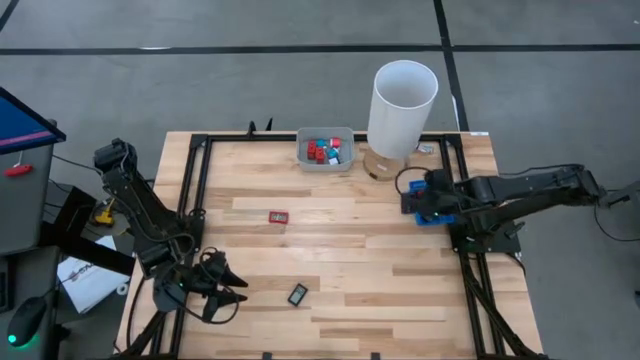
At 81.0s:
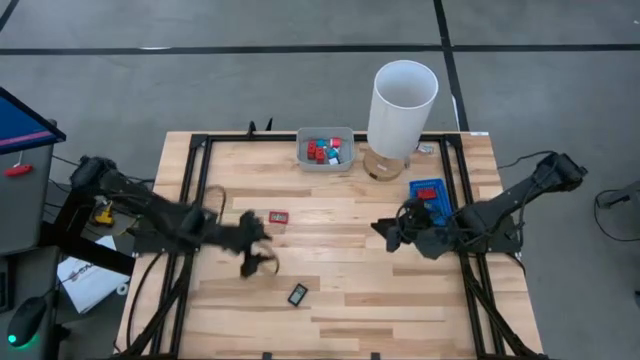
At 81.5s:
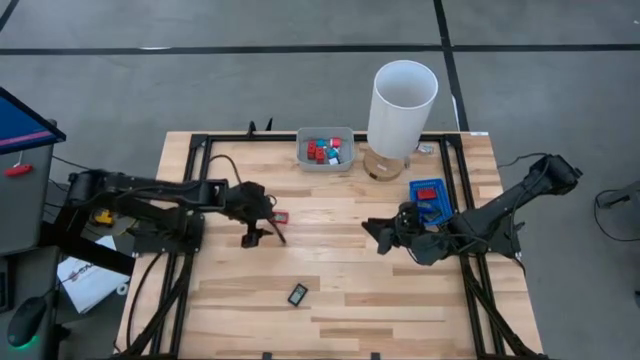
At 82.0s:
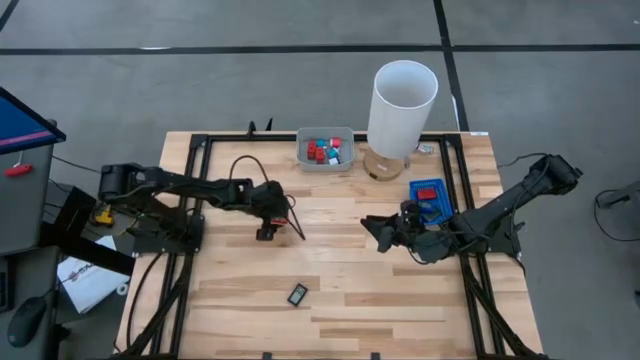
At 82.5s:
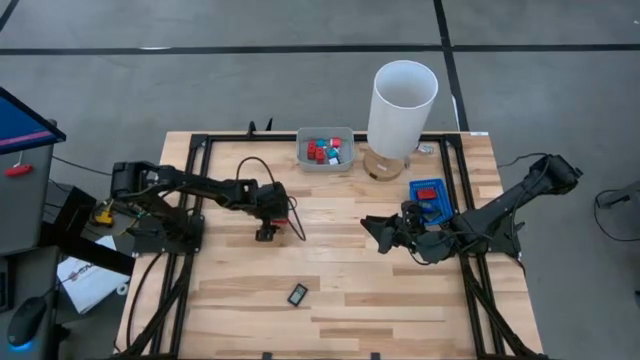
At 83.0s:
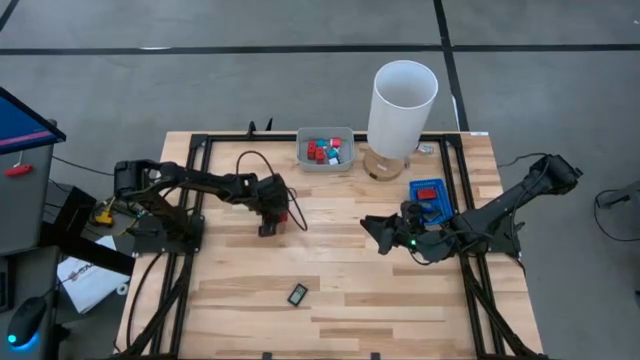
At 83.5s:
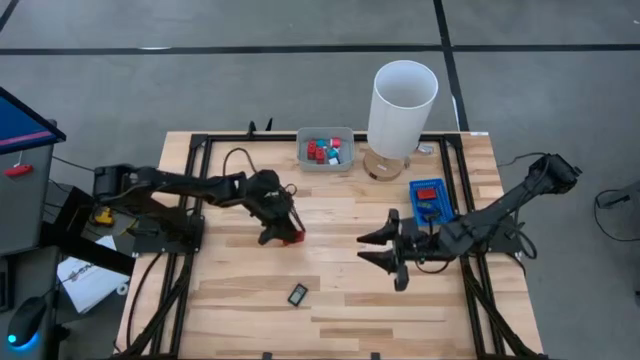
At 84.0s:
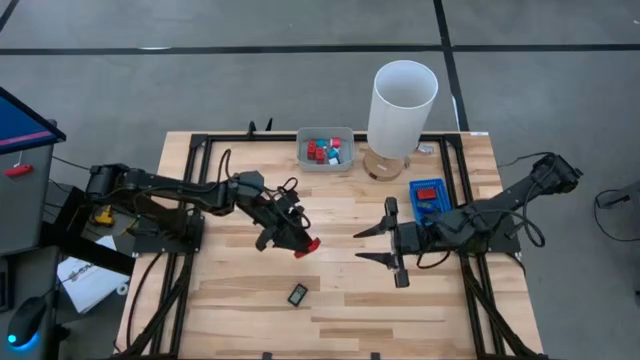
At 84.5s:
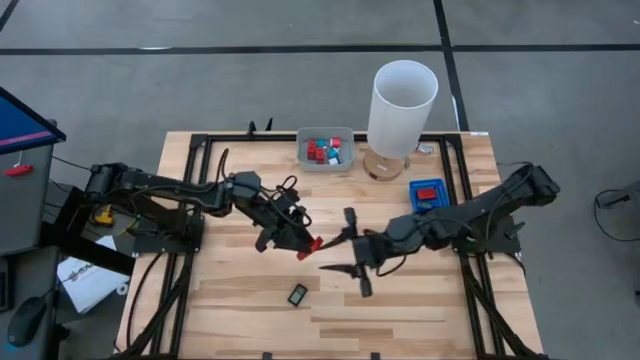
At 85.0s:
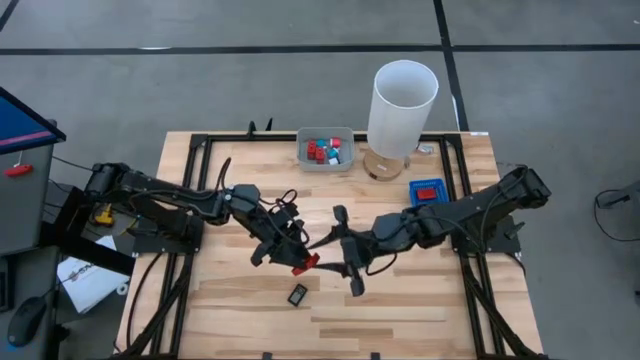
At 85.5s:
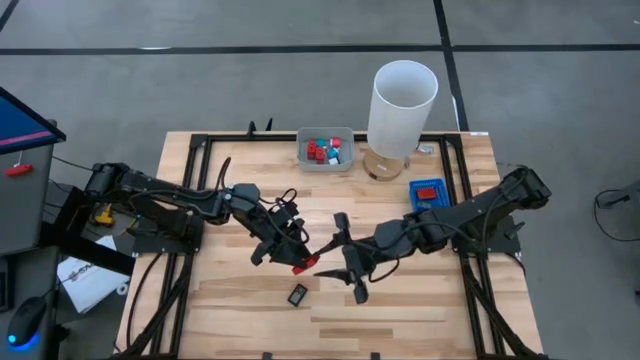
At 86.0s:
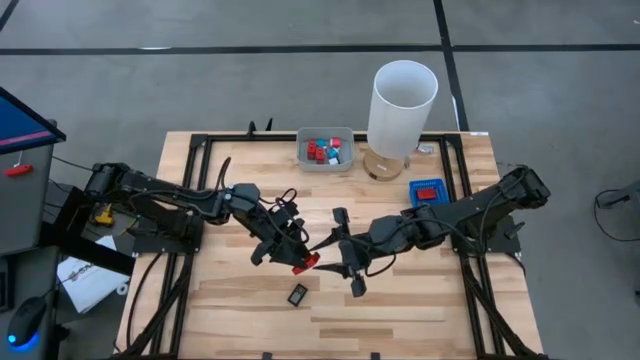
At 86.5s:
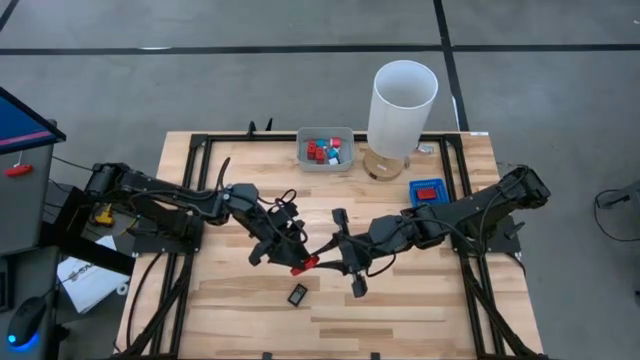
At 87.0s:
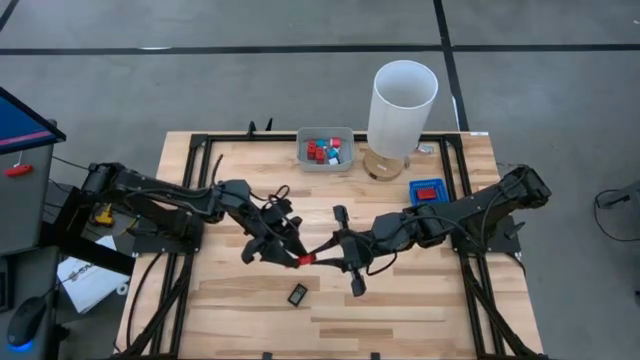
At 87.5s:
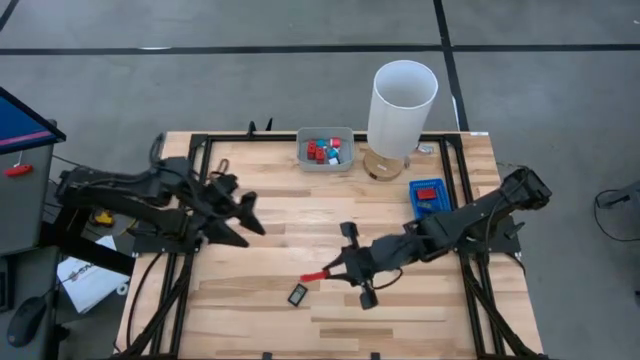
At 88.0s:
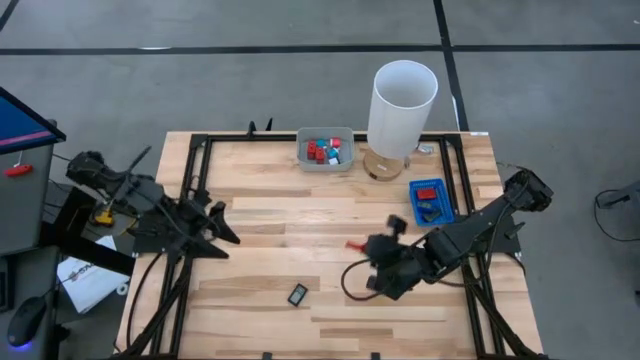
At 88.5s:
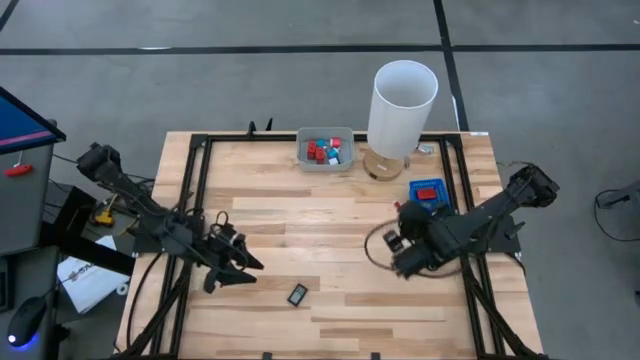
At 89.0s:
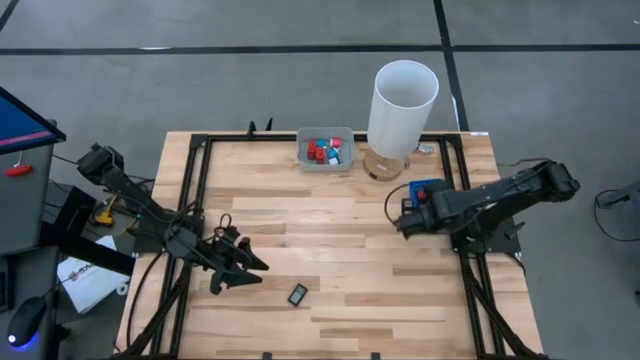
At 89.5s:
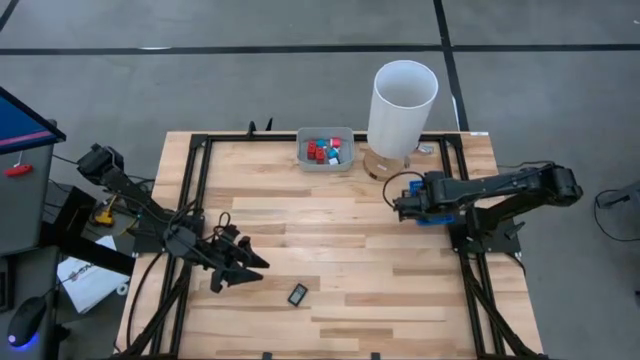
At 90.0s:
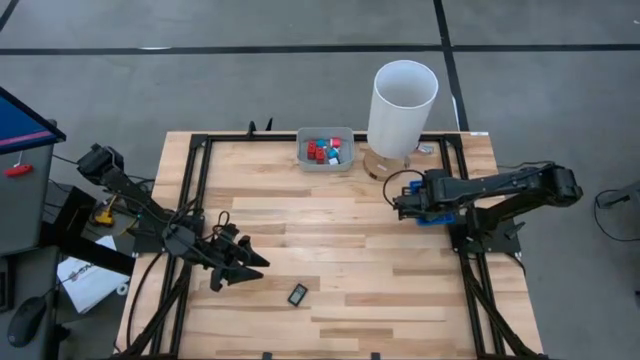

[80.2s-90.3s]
Task: Pick & Place Office items
Put the red digital clock into the blue basket

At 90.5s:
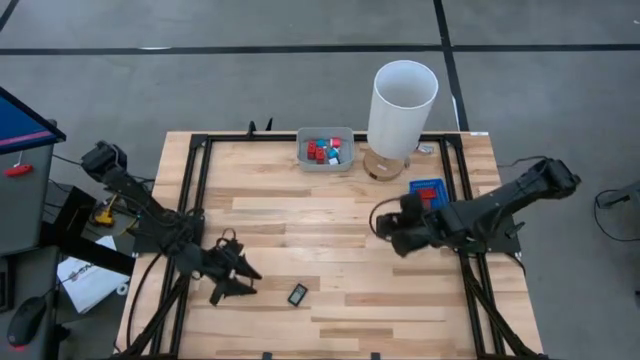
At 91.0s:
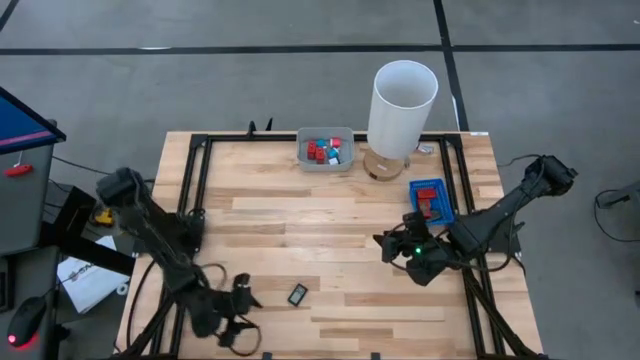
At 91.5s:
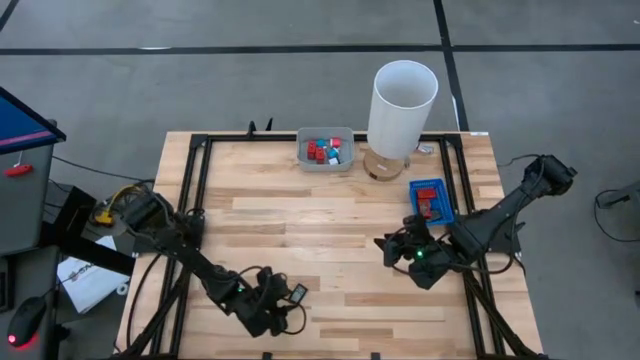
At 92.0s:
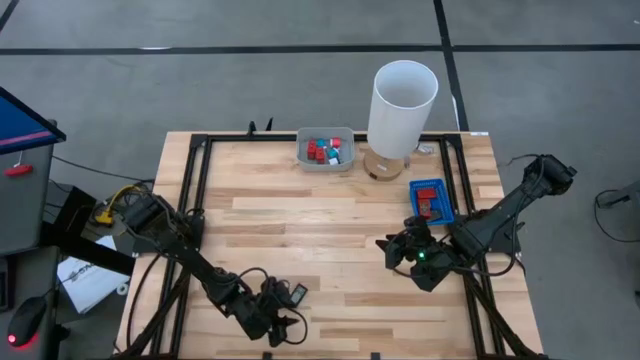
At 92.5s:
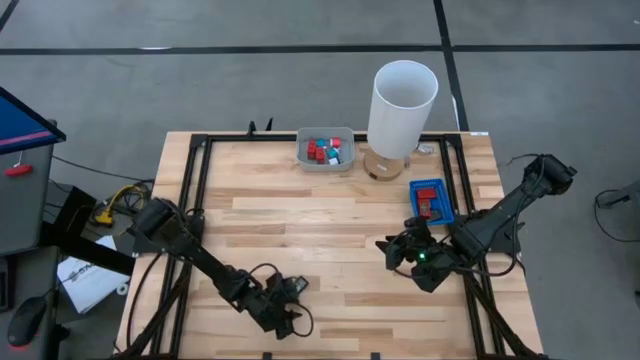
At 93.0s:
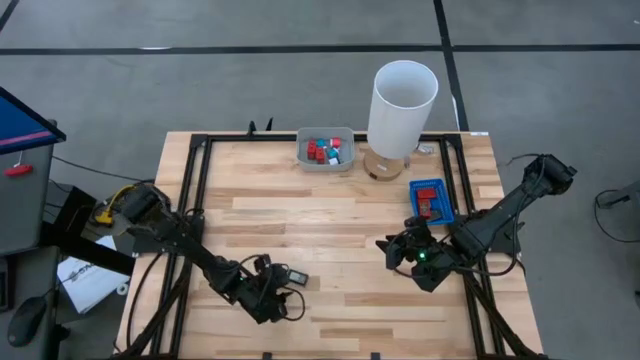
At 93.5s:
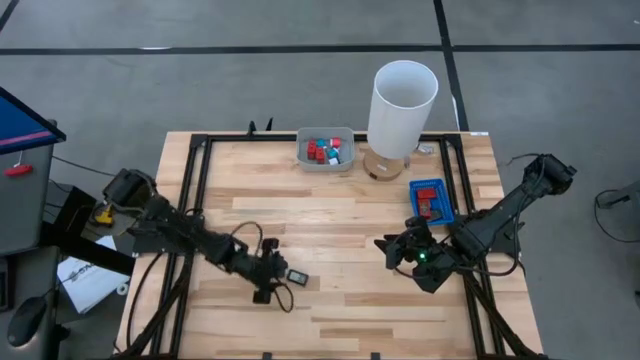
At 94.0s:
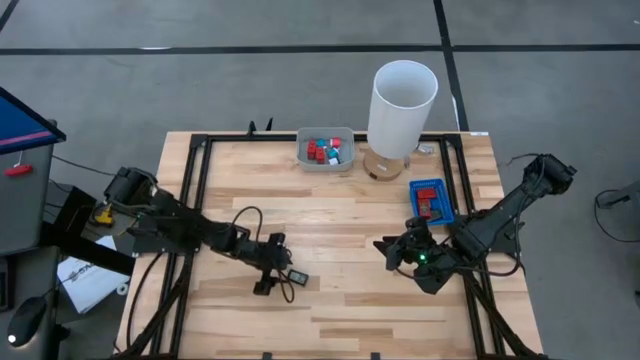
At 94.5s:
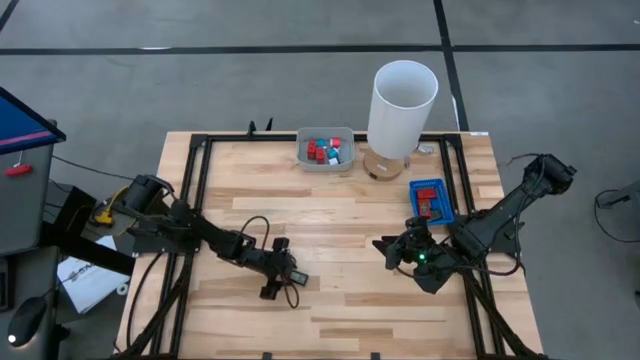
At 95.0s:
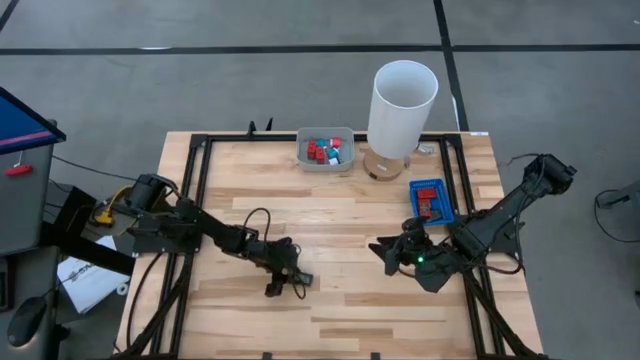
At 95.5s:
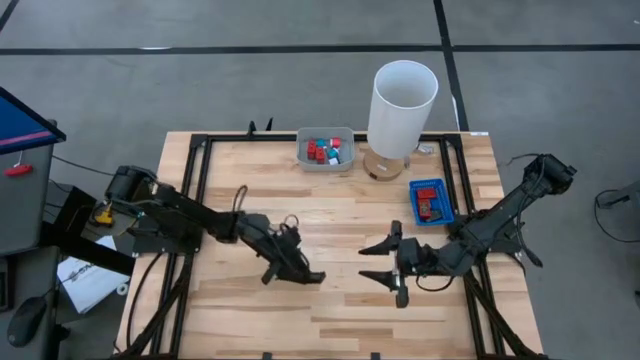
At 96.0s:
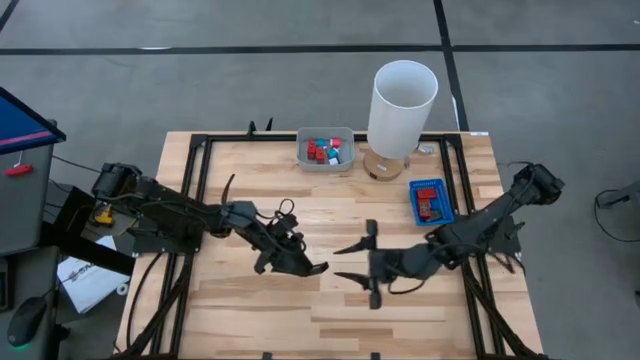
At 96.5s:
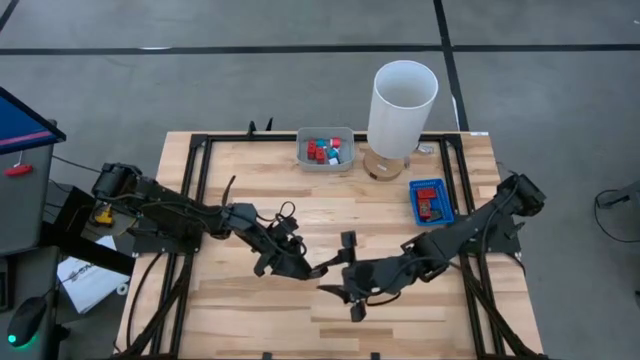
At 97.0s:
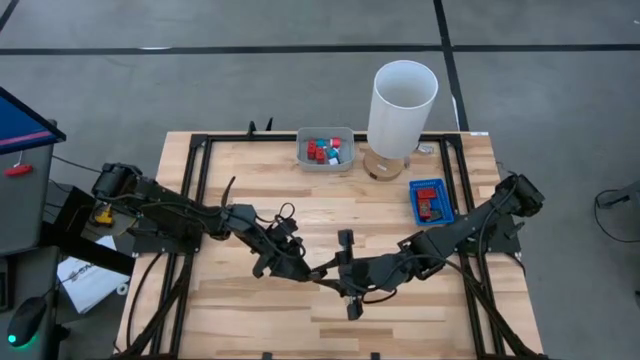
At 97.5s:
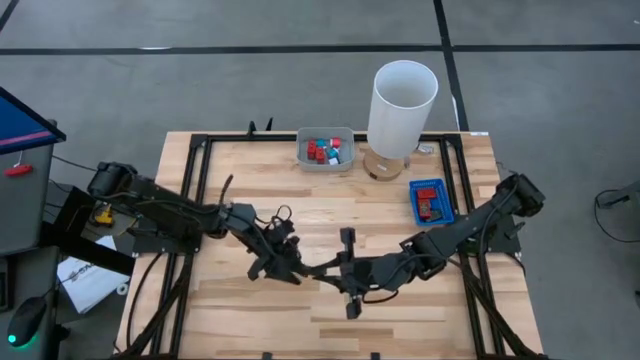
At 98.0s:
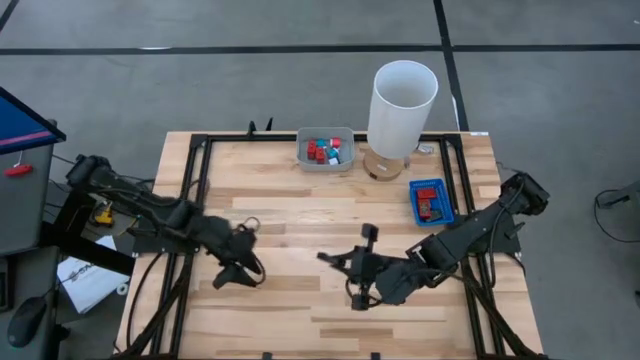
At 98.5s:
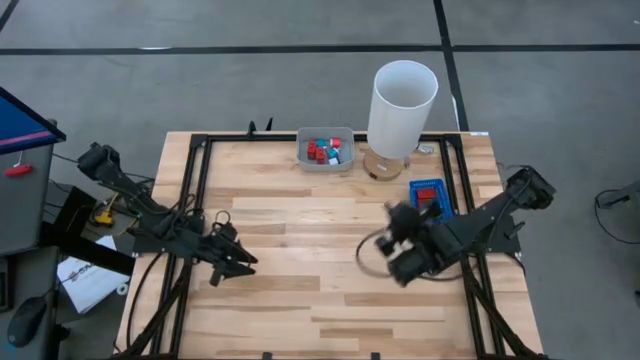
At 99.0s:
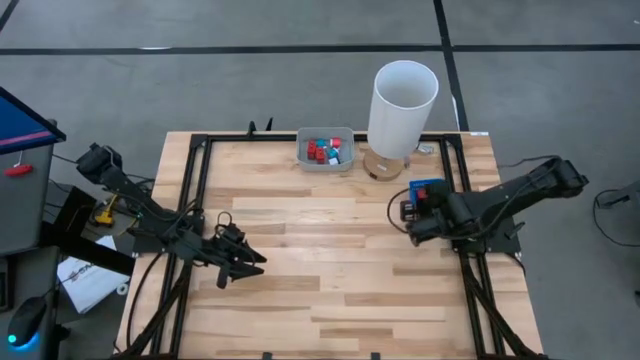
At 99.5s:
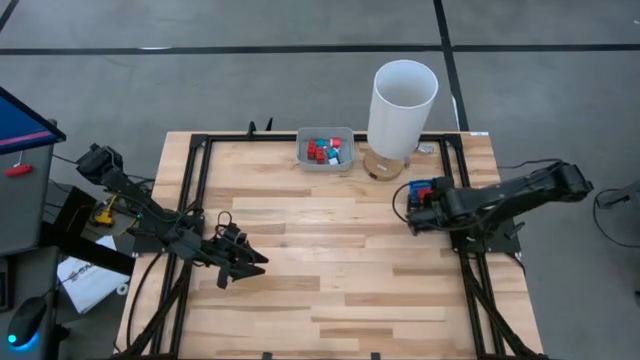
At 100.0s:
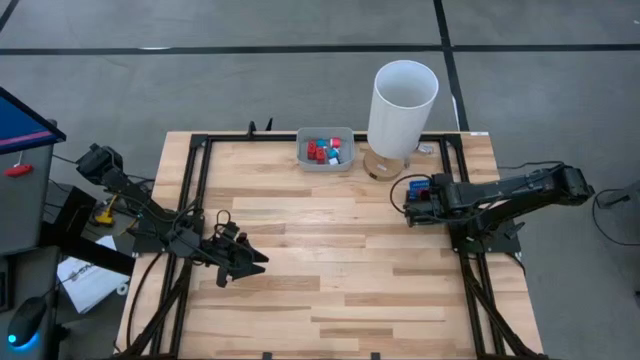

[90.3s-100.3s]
Put the black digital clock into the blue basket

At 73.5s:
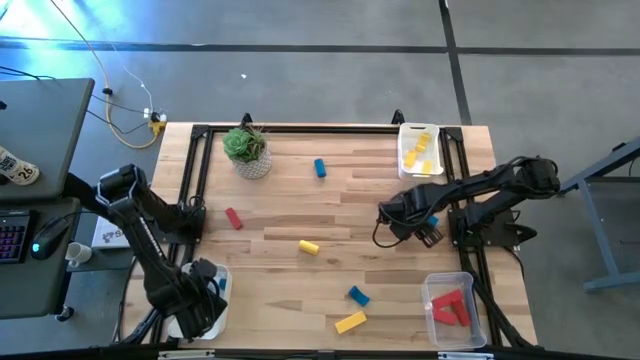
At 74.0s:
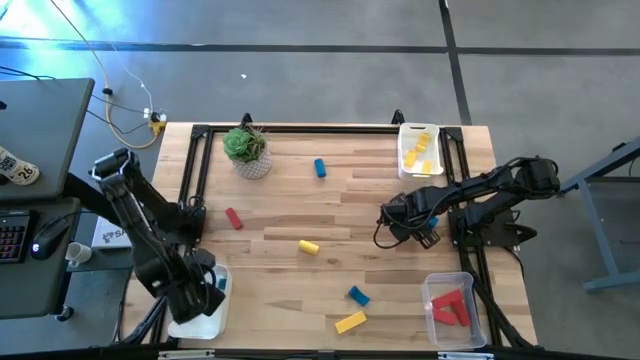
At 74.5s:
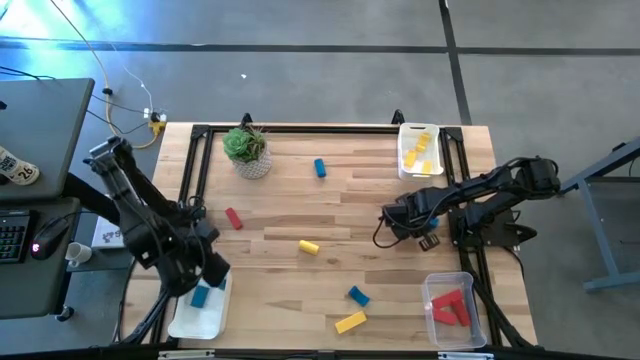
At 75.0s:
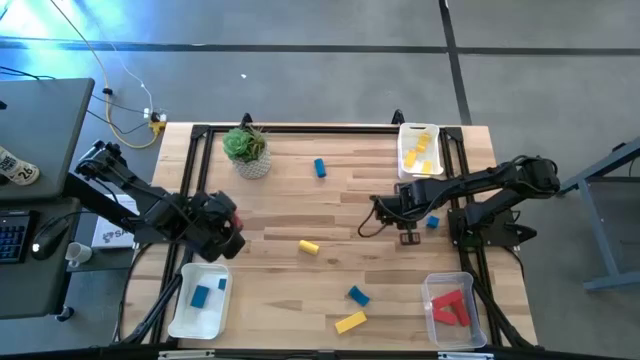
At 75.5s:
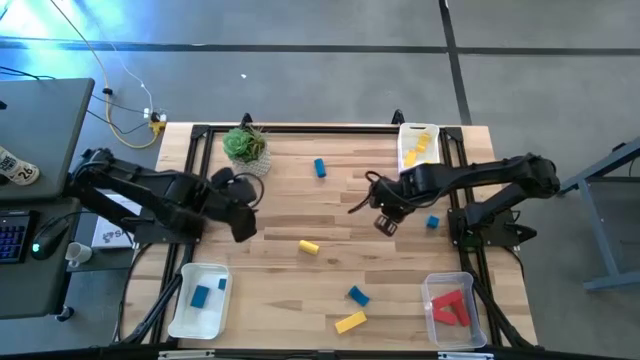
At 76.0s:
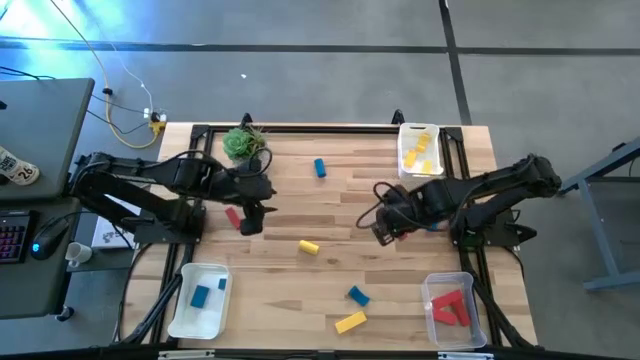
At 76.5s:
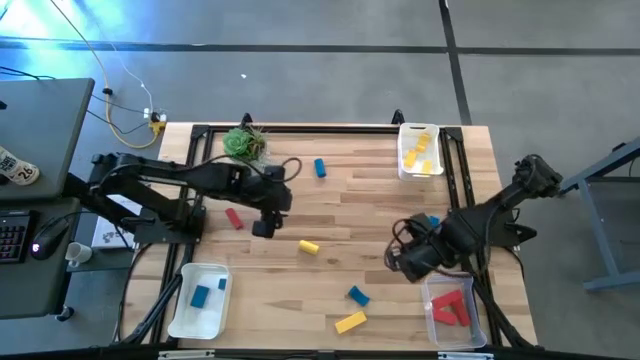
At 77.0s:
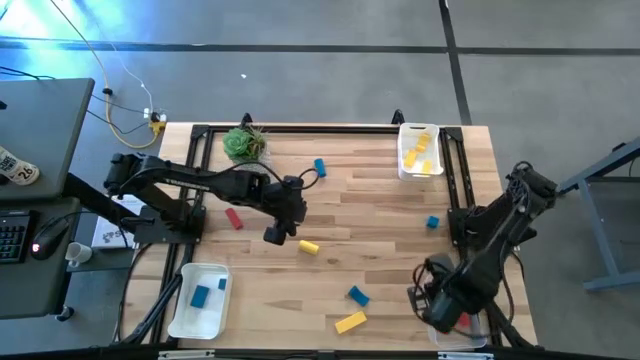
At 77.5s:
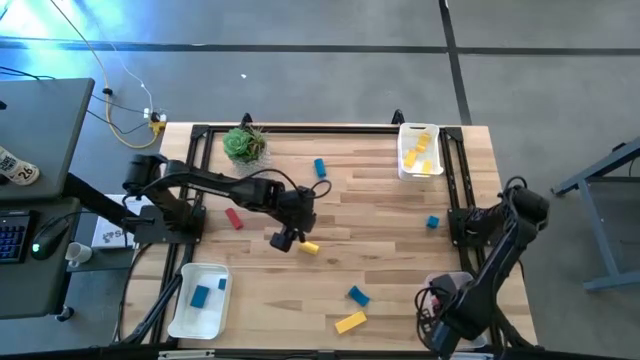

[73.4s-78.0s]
Task: Sort & place blocks by color
Put the red block into the transparent bin
